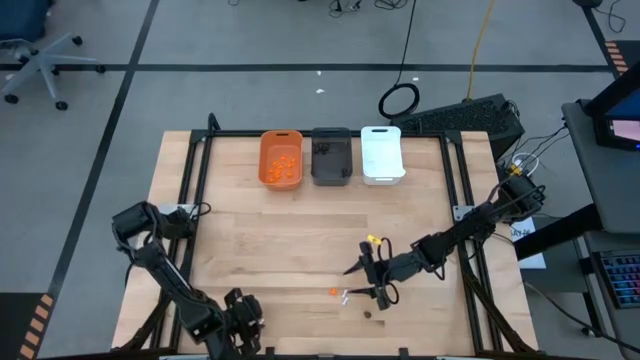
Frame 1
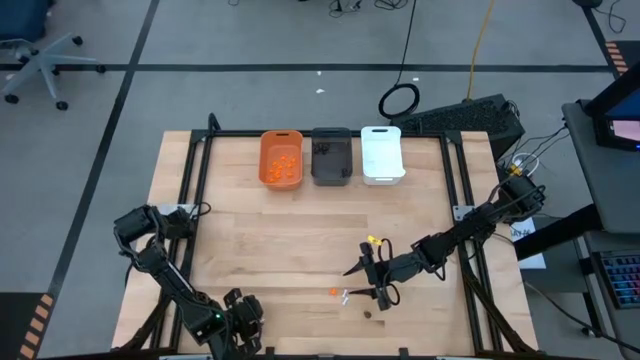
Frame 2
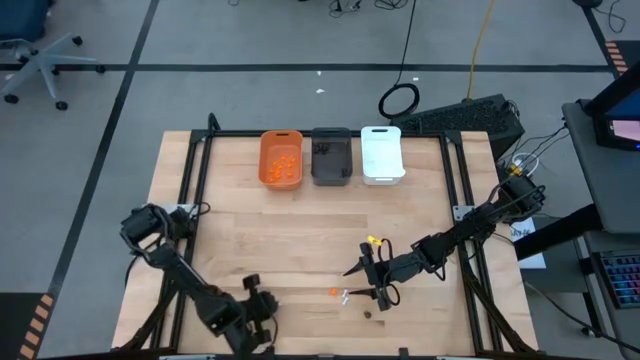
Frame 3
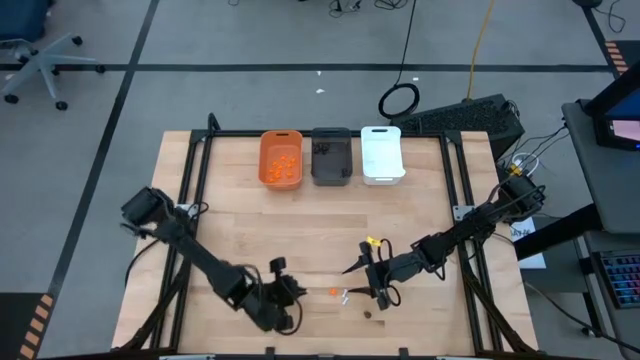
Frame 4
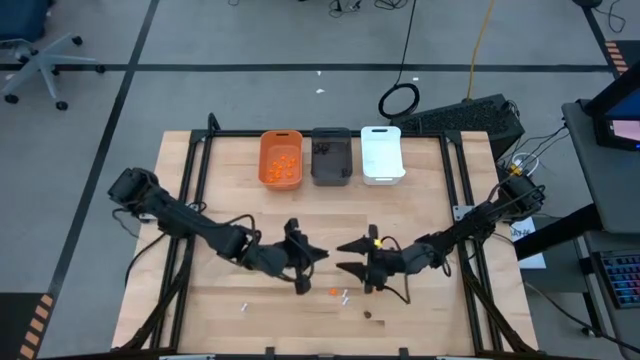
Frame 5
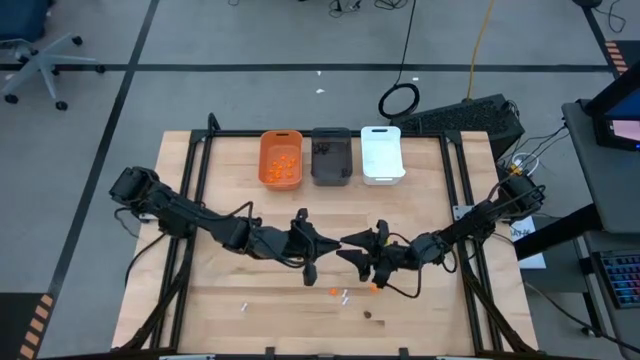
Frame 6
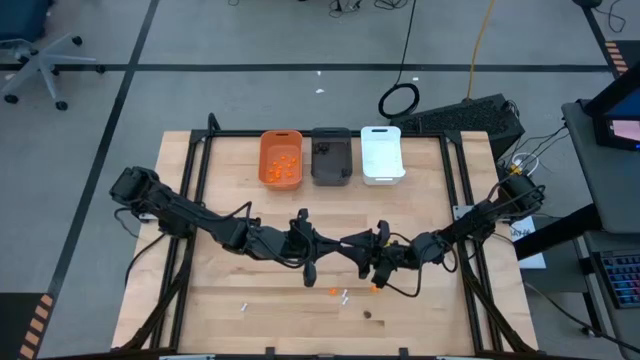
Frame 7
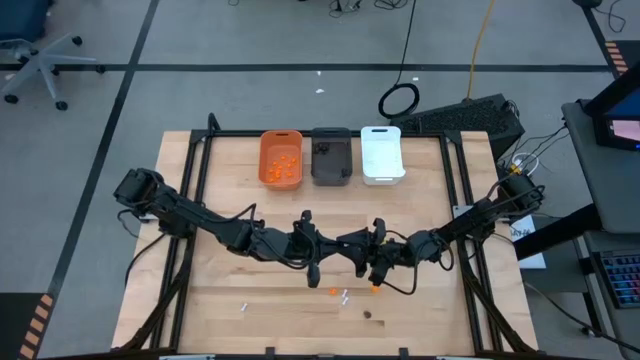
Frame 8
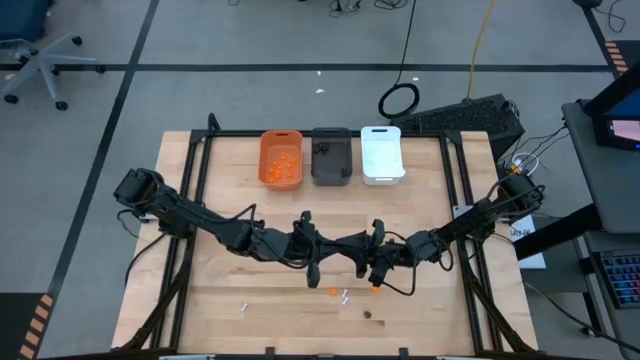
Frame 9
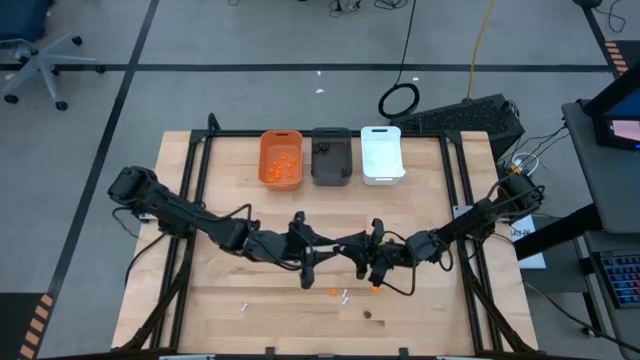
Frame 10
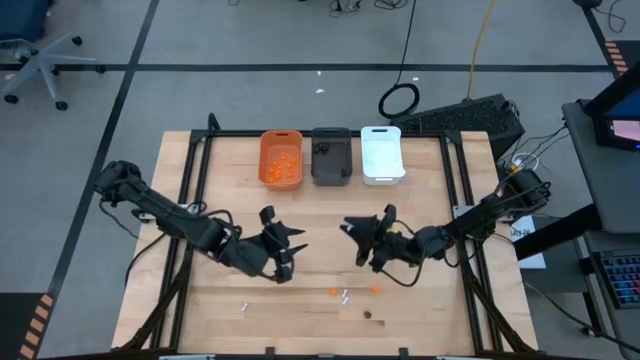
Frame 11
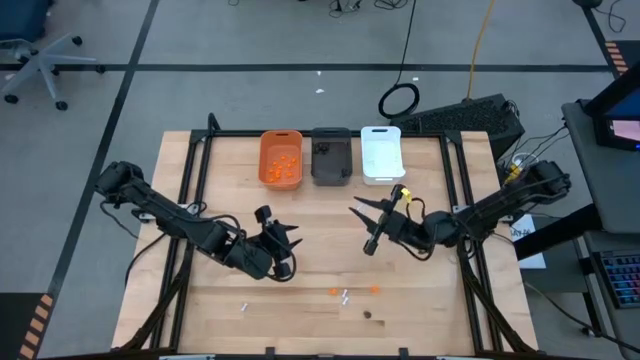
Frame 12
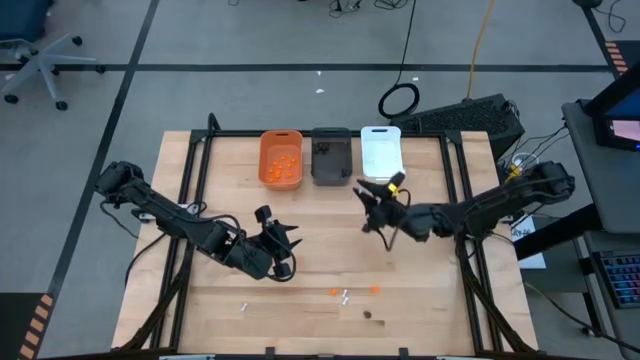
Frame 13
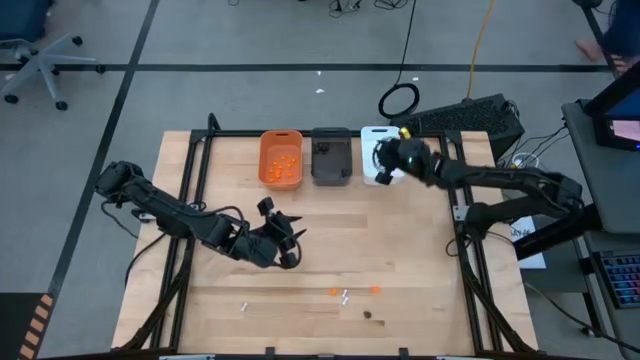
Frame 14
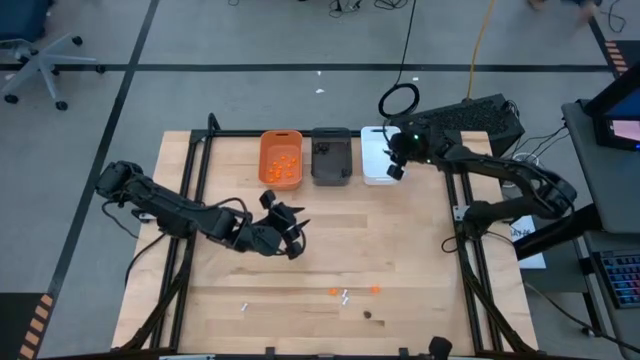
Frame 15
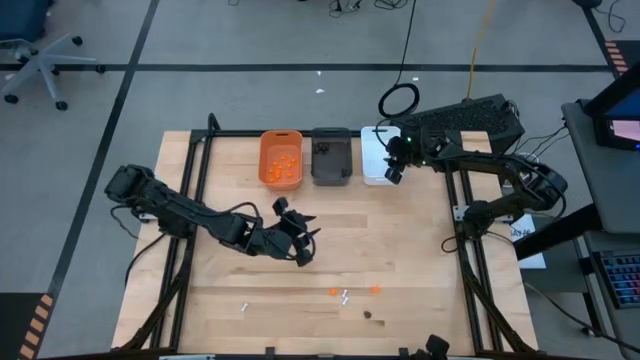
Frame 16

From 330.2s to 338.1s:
Task: Sort Halloween decoration
Put the white bone toy into the white bin

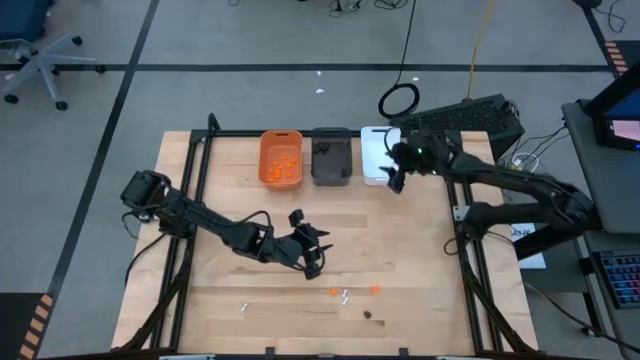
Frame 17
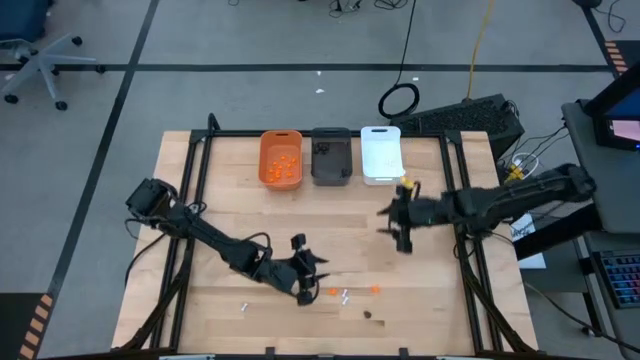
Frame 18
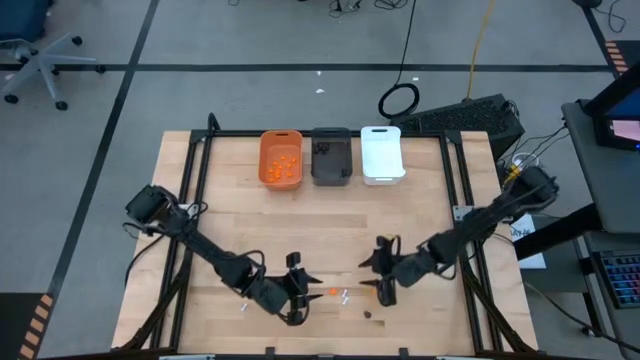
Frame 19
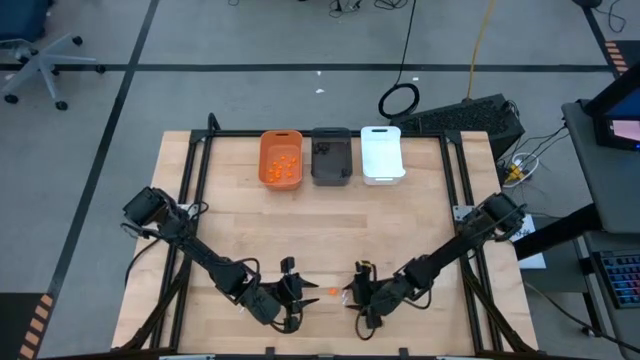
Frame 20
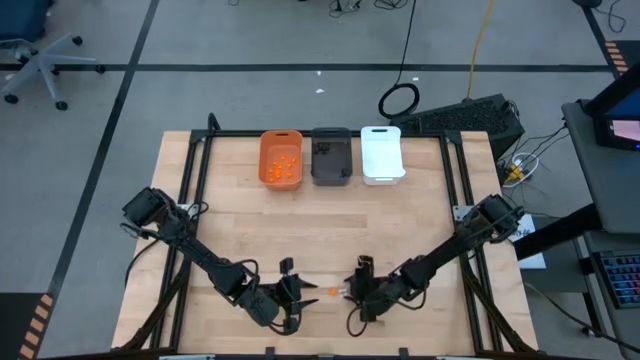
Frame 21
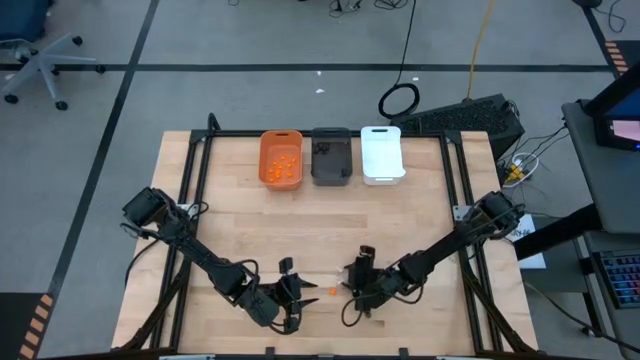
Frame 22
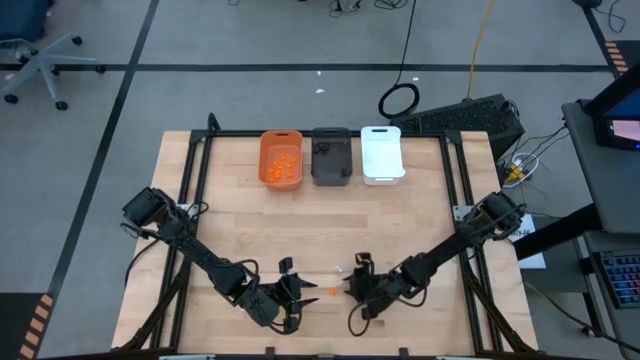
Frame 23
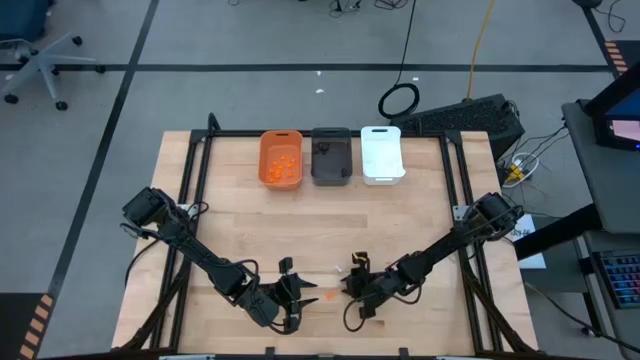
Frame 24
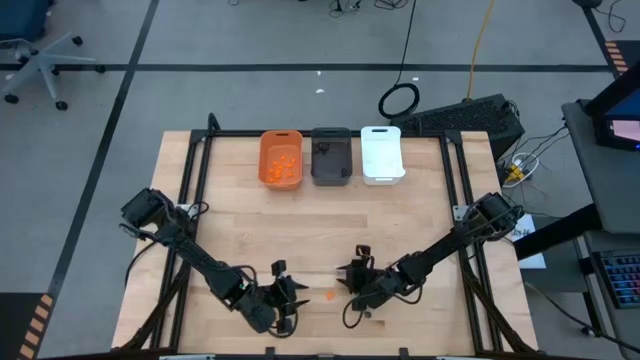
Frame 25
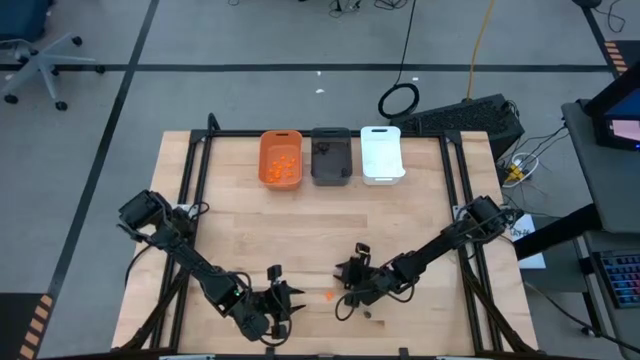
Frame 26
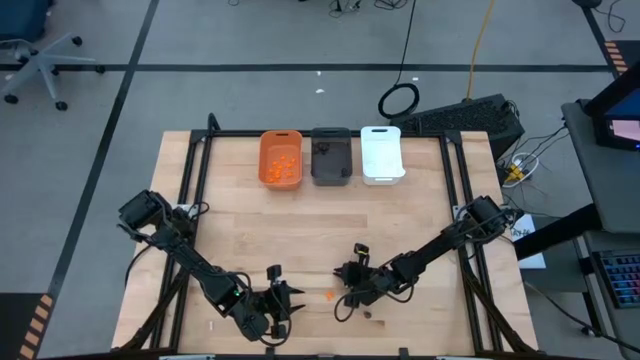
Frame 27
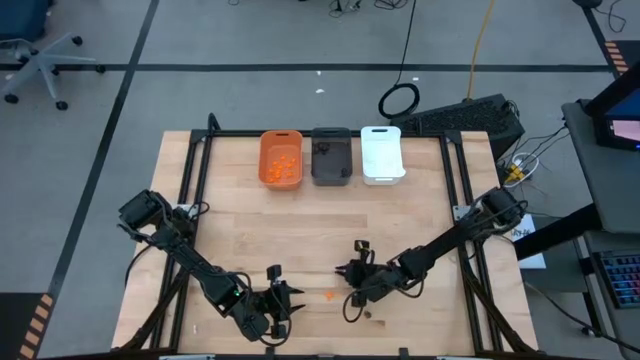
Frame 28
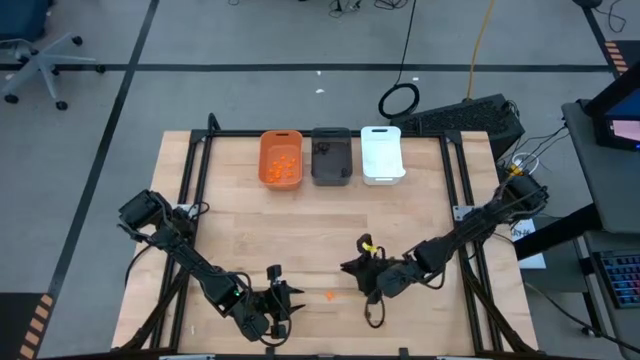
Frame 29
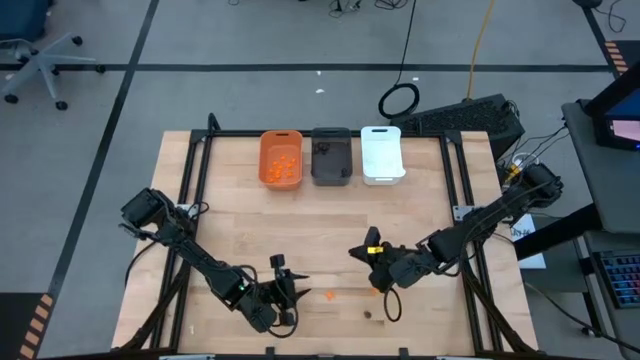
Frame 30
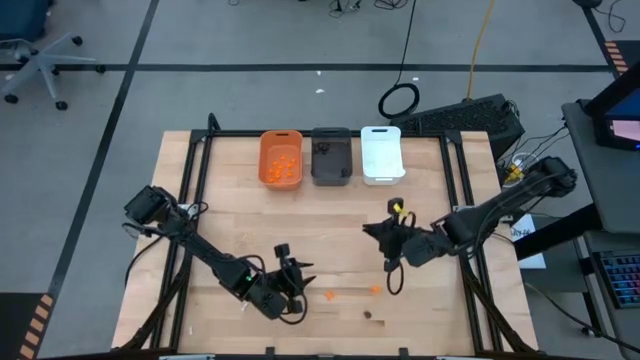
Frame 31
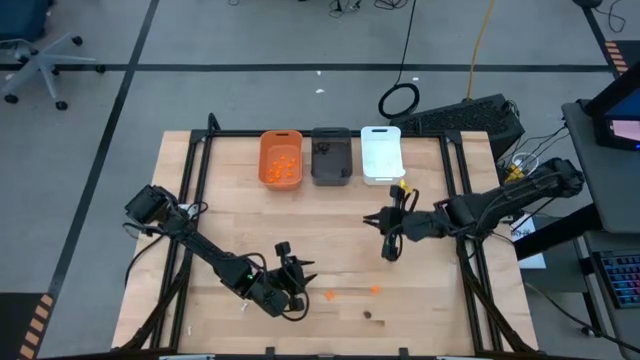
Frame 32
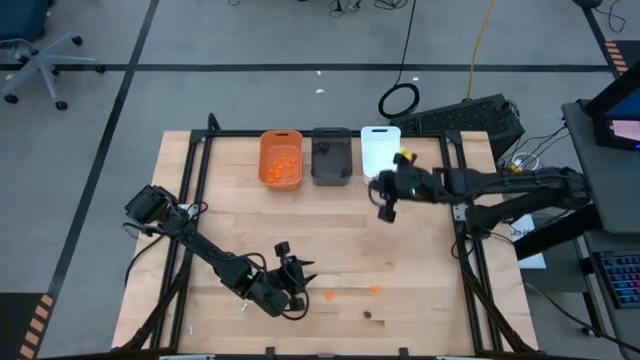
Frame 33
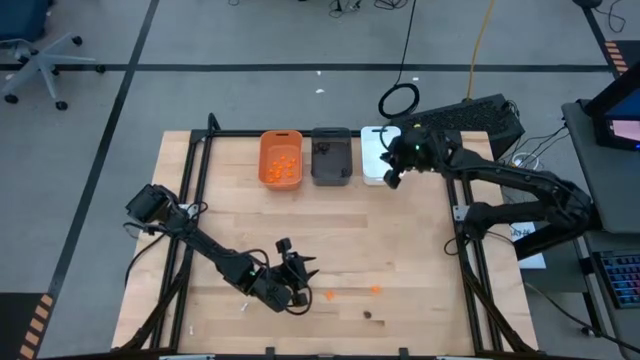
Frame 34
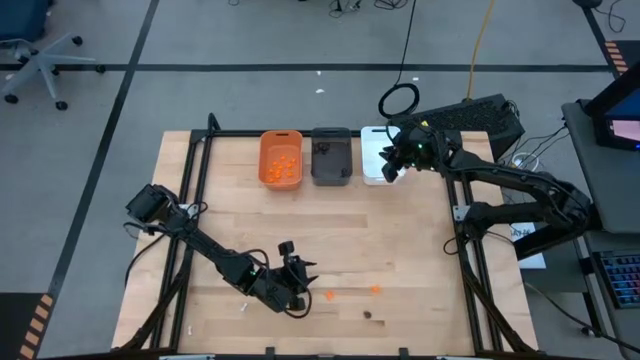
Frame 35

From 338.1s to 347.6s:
Put the white bone toy into the white bin

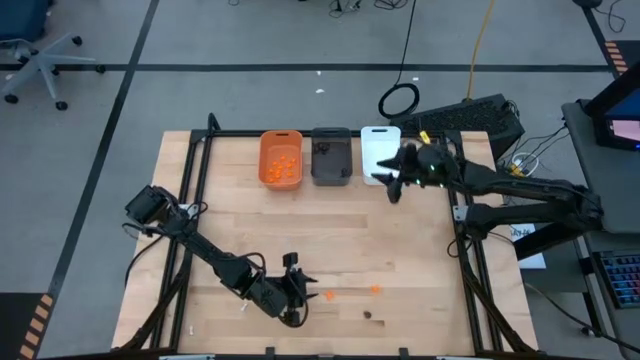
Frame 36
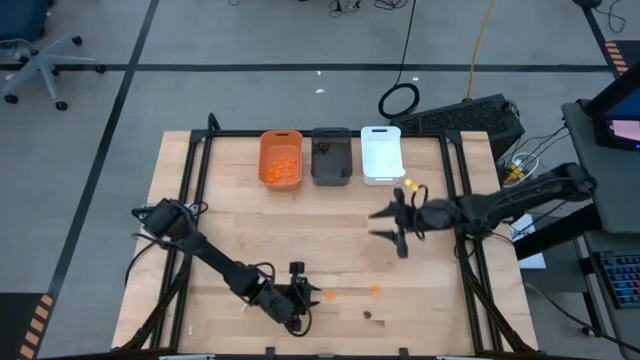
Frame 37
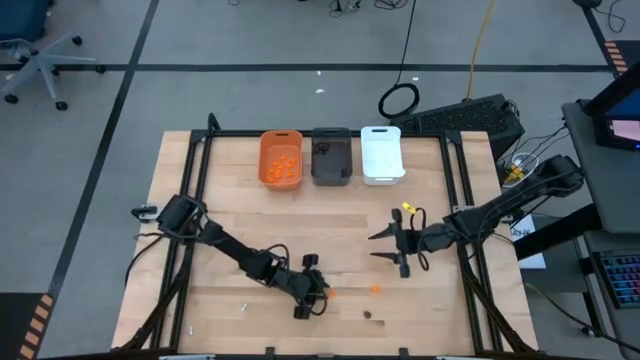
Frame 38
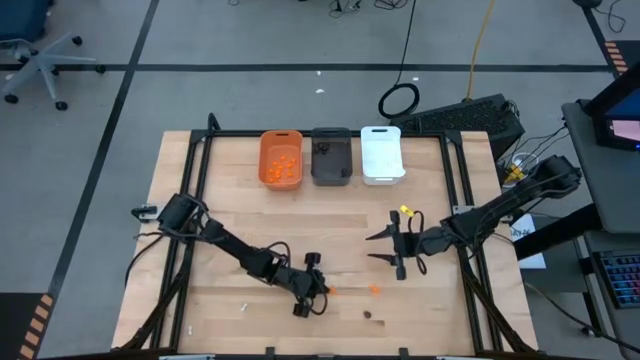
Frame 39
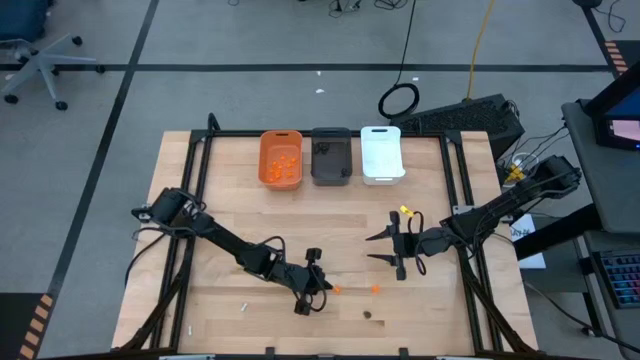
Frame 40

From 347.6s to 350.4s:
Put the orange spider toy into the orange bin
